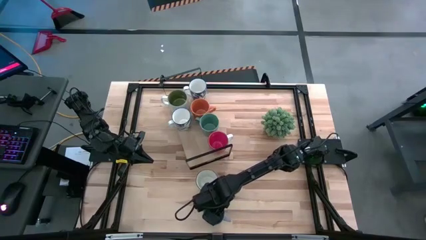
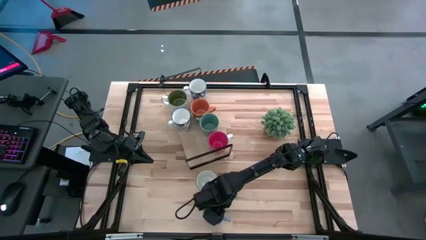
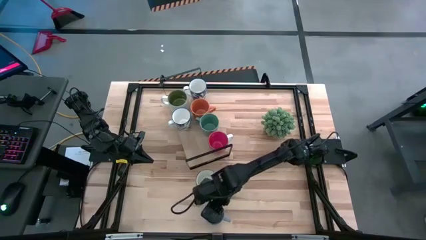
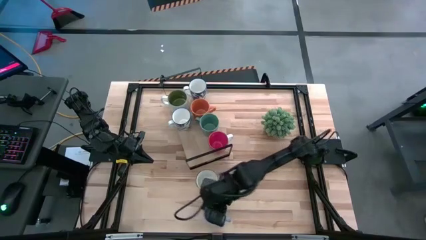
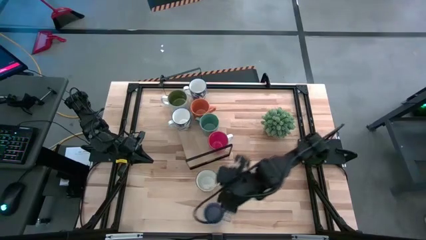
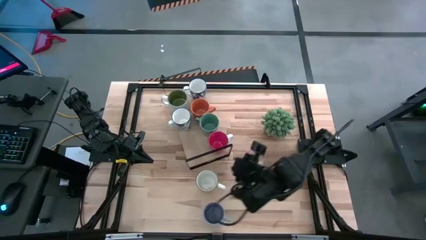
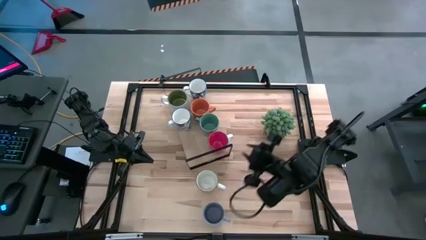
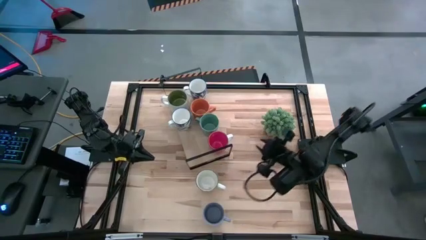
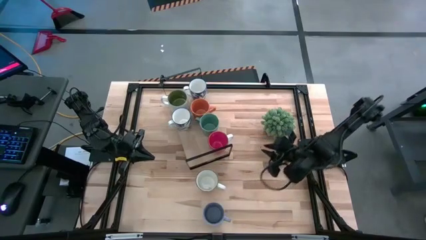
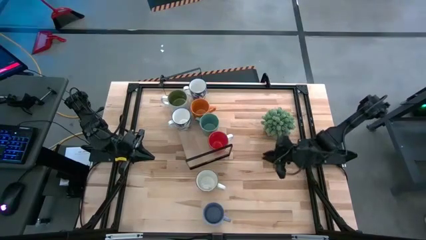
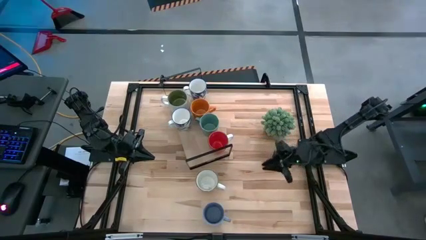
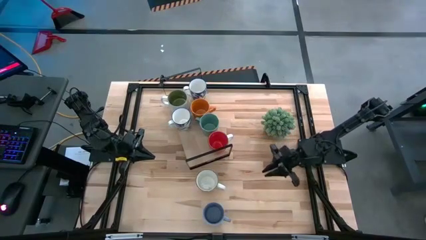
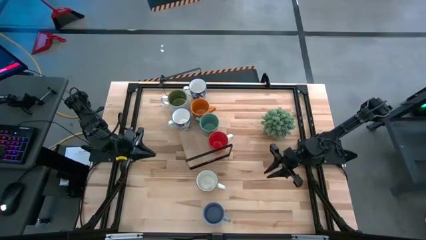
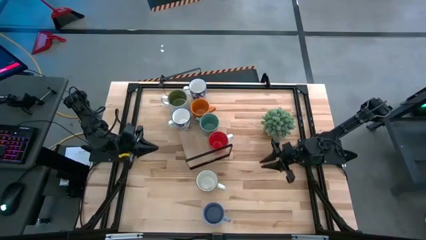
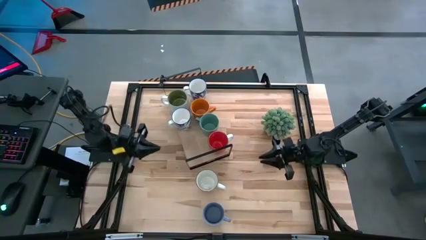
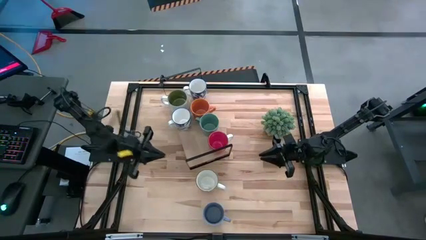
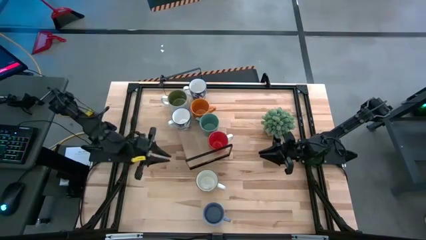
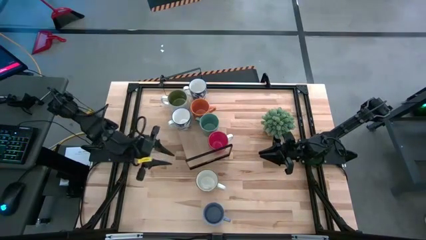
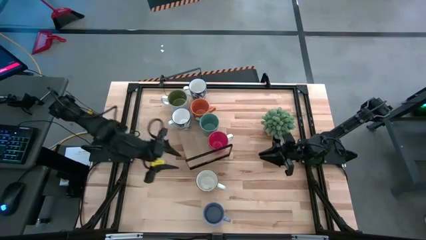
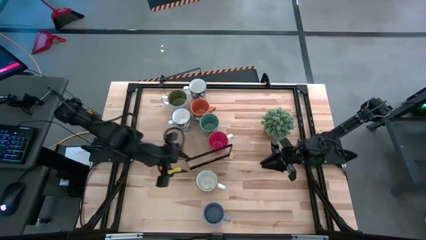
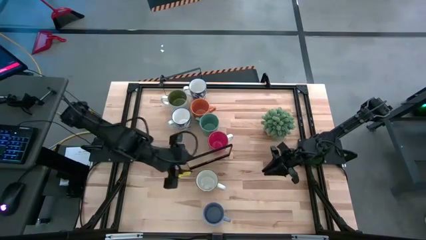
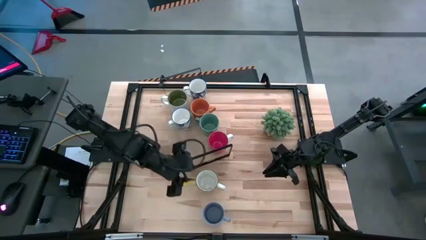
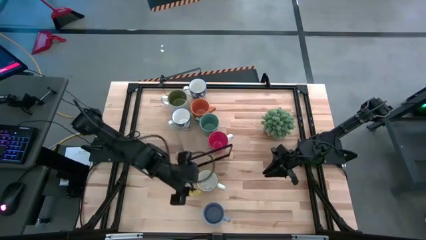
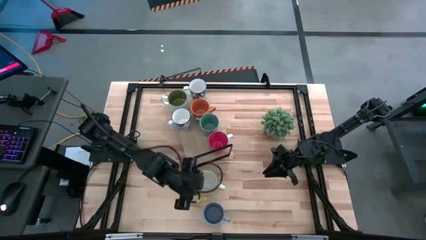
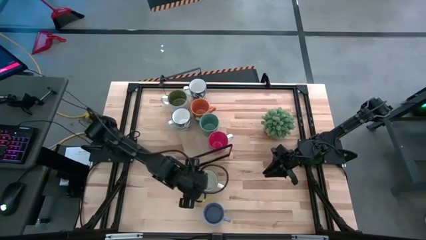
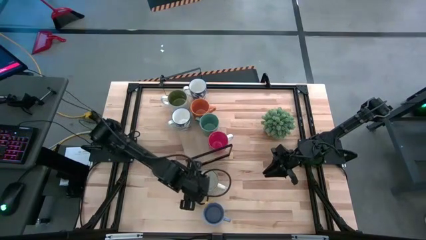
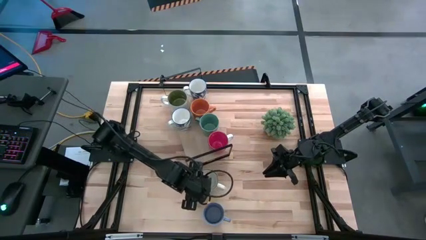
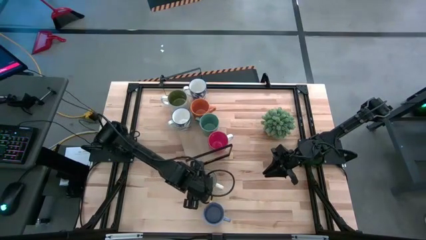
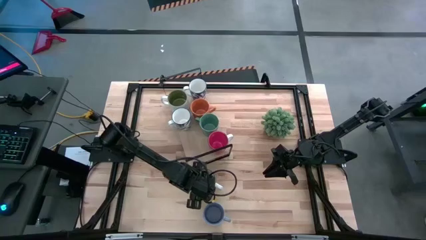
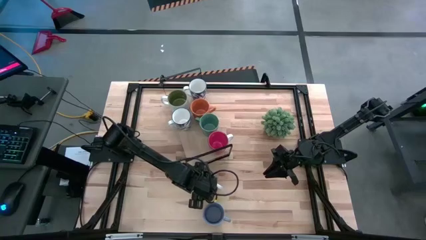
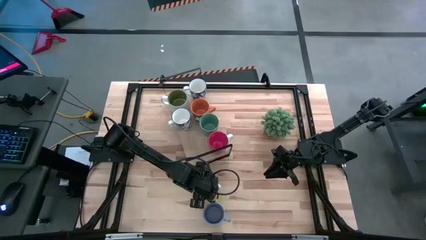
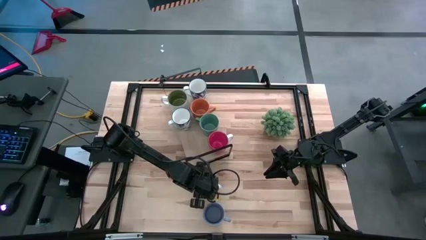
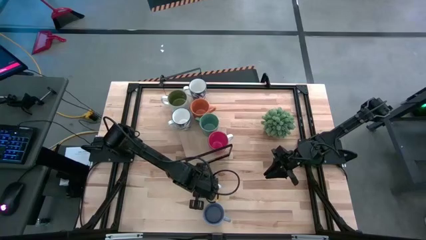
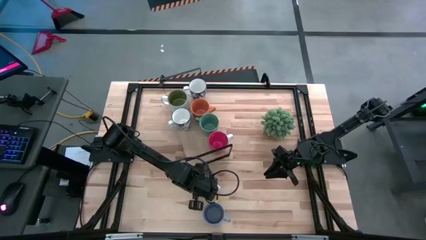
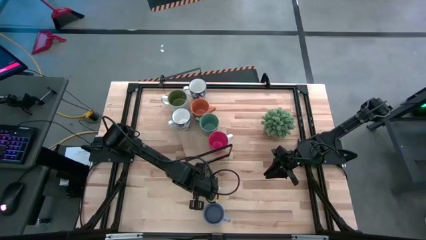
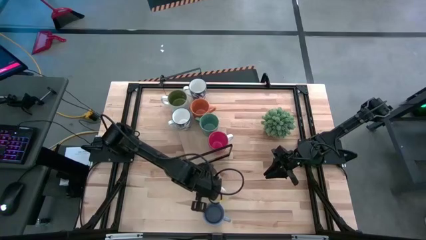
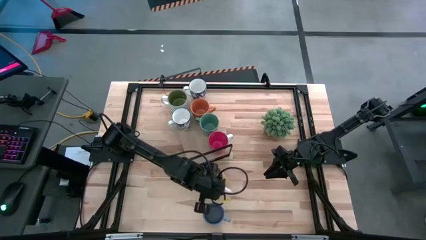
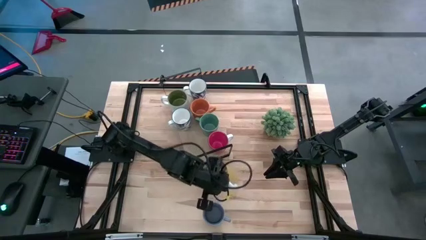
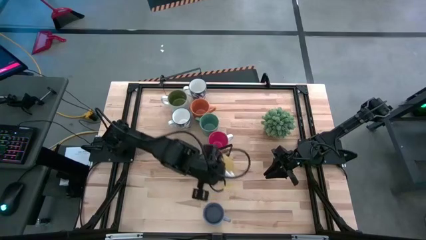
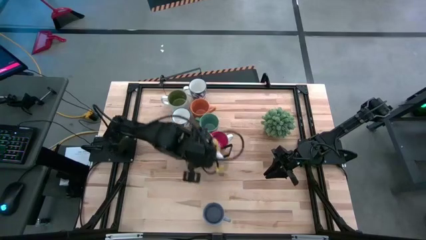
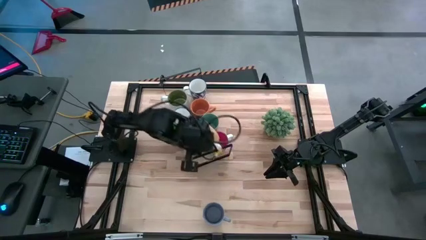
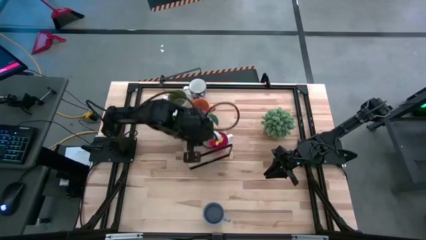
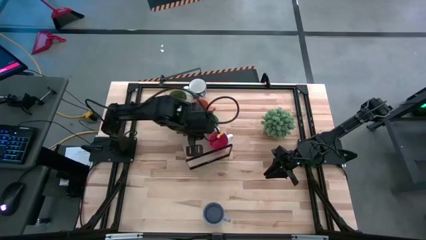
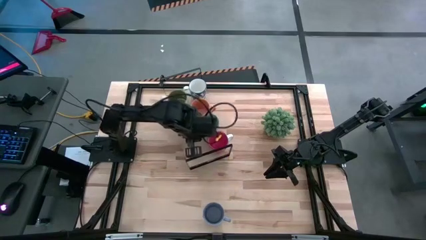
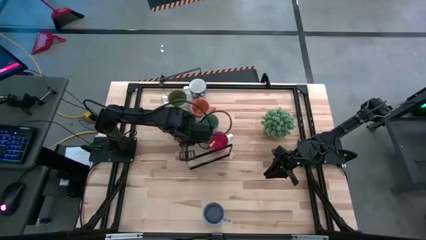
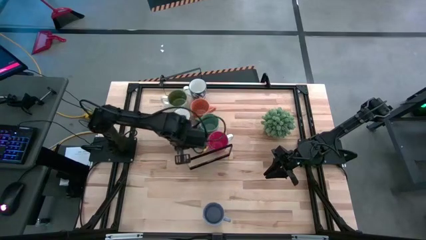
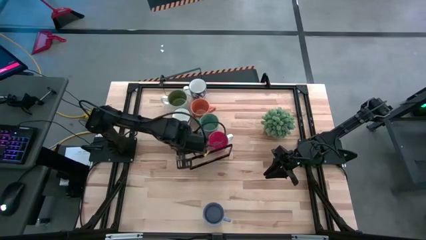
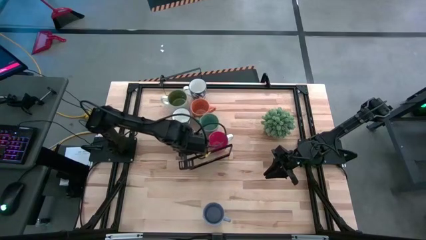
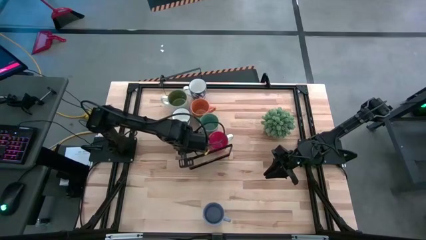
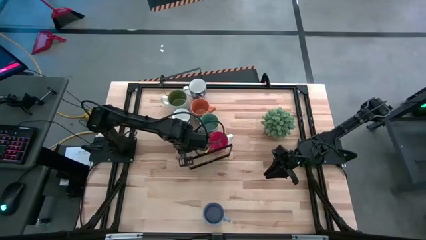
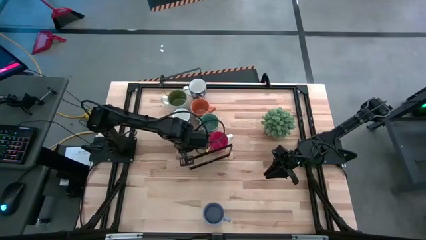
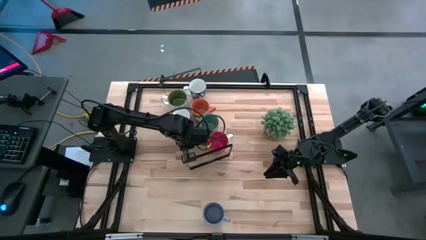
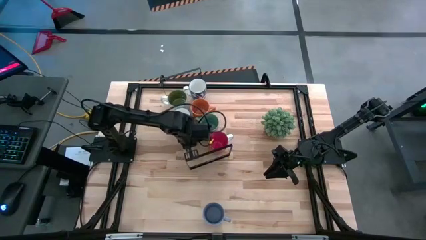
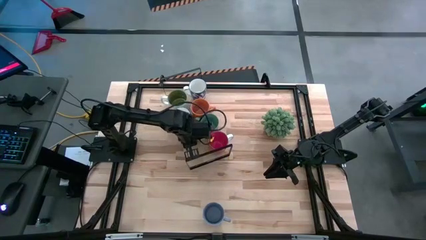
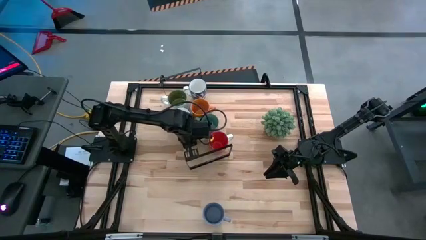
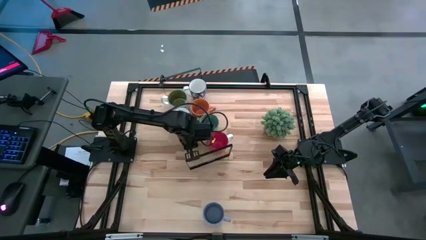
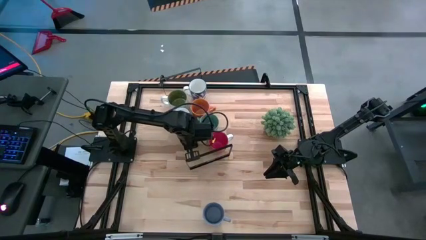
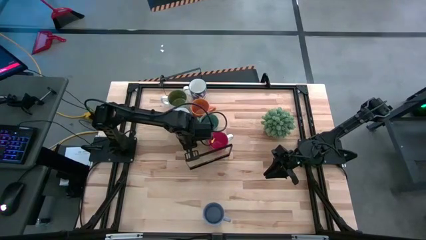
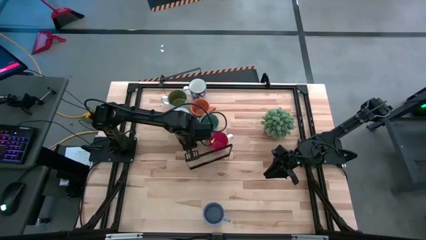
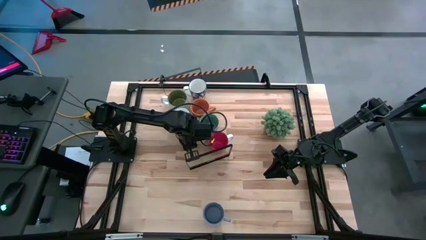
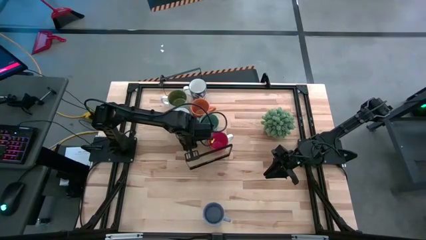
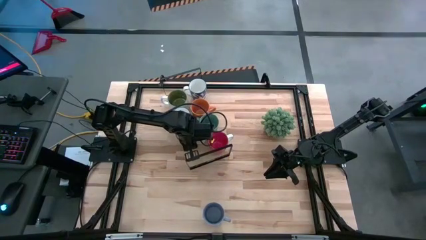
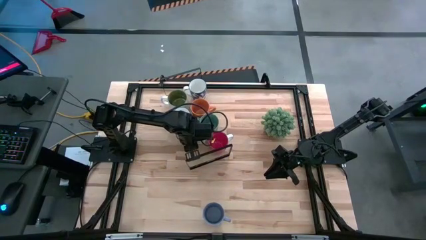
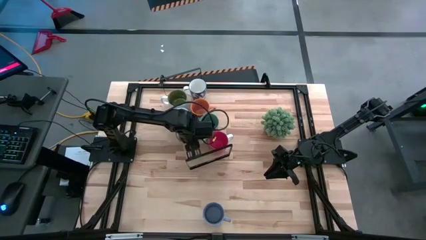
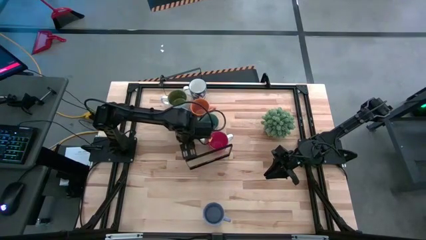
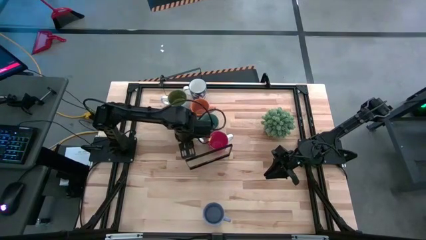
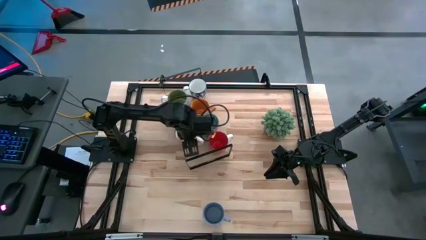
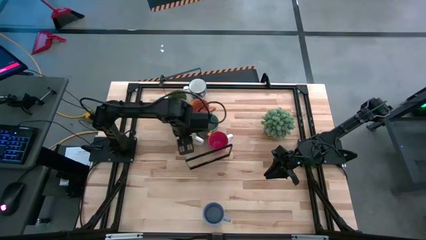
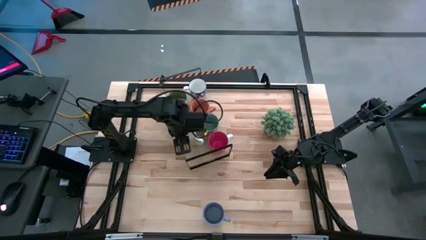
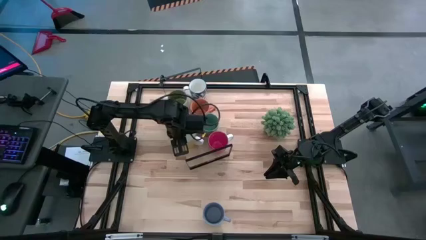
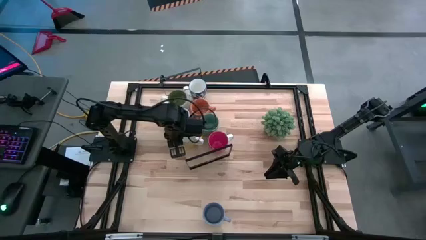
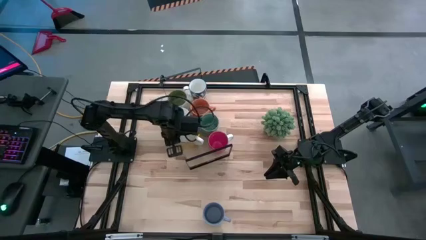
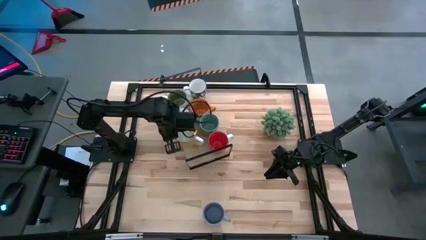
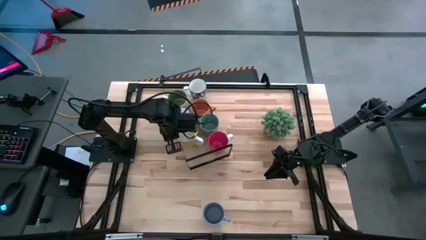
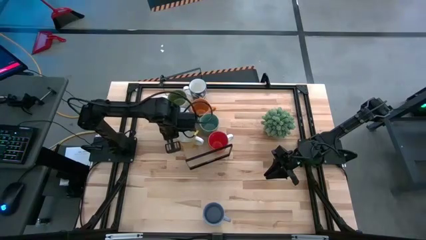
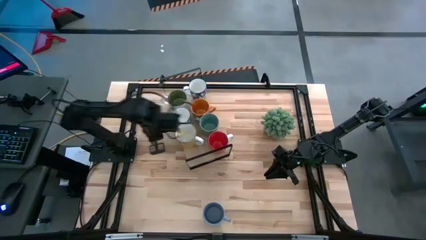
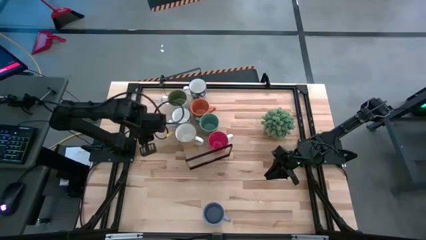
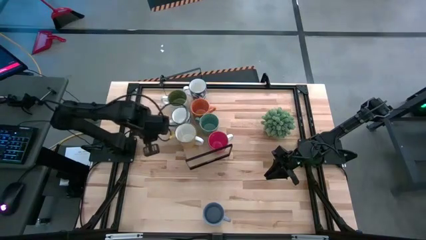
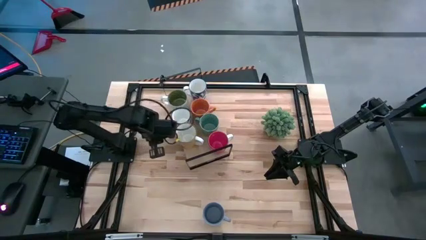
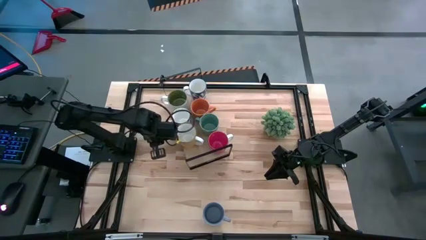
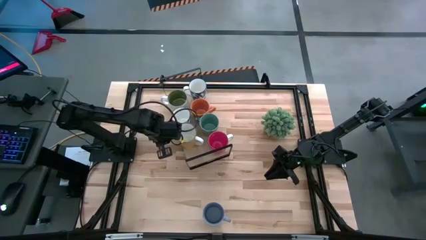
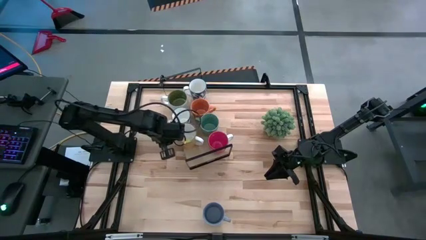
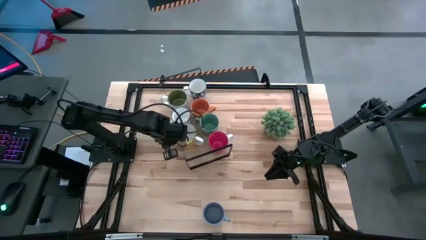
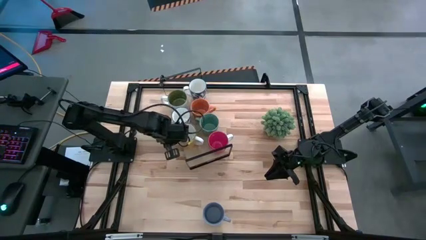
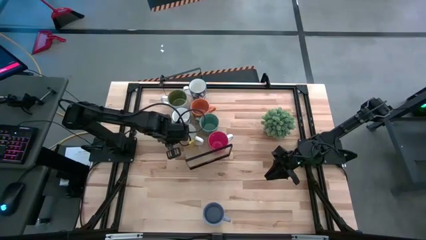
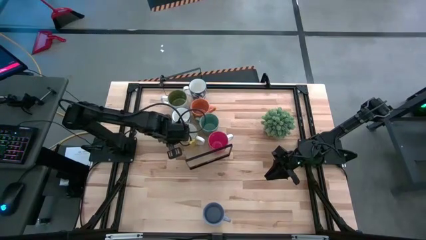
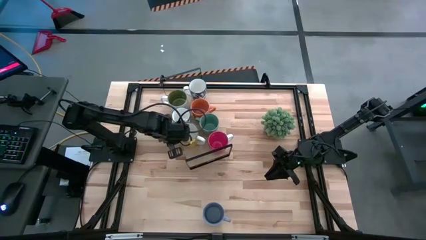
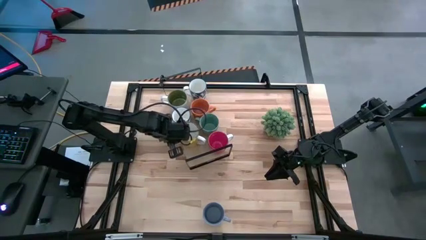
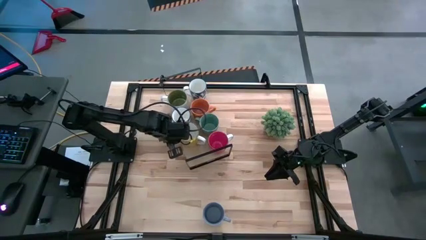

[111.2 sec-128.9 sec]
Task: Place coffee mugs
Put the yellow mug on the shelf
